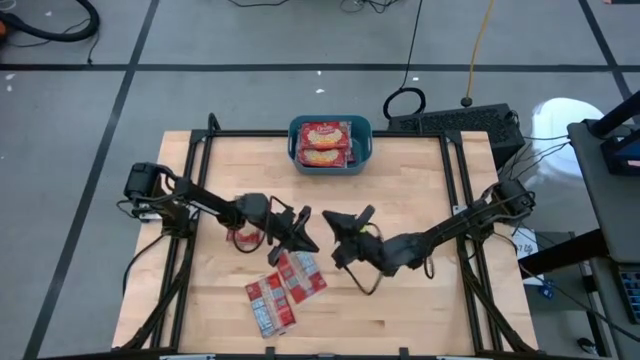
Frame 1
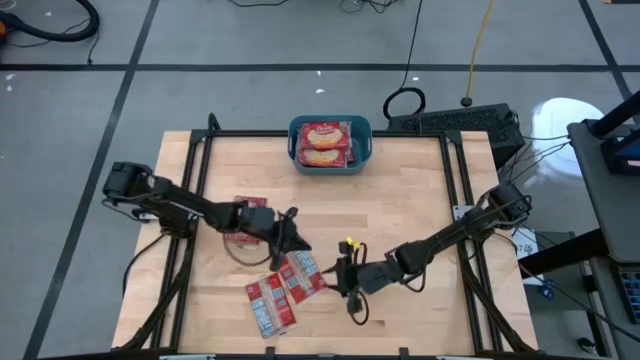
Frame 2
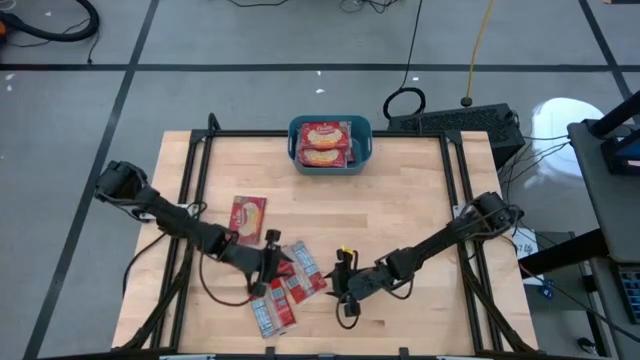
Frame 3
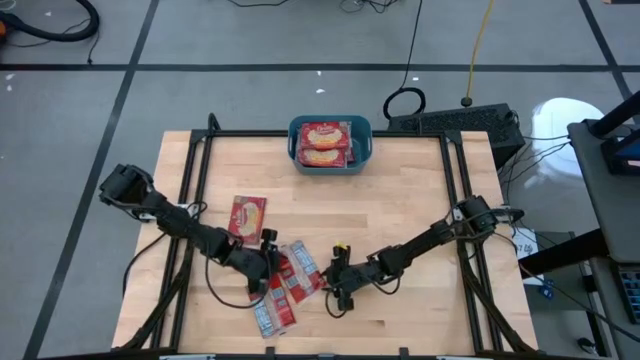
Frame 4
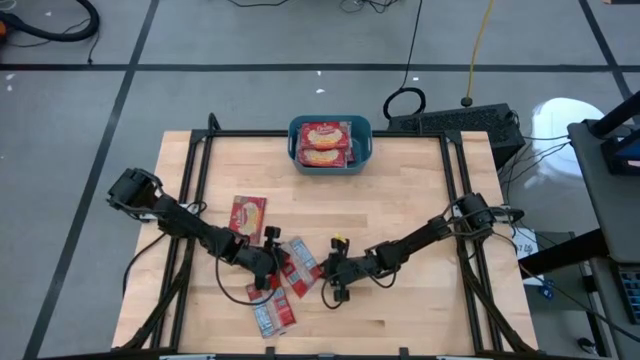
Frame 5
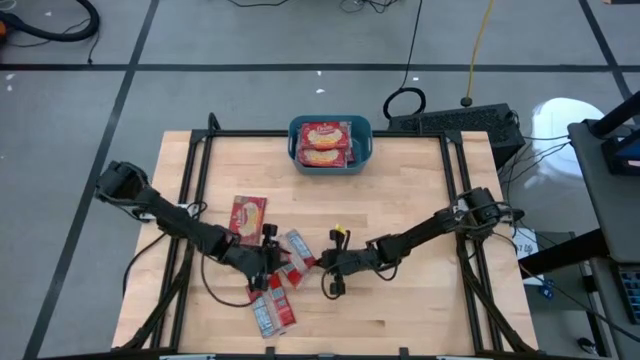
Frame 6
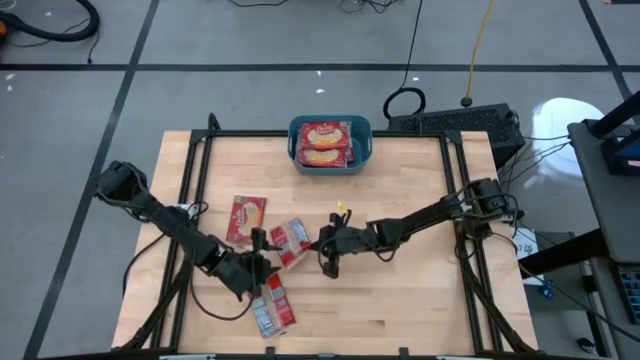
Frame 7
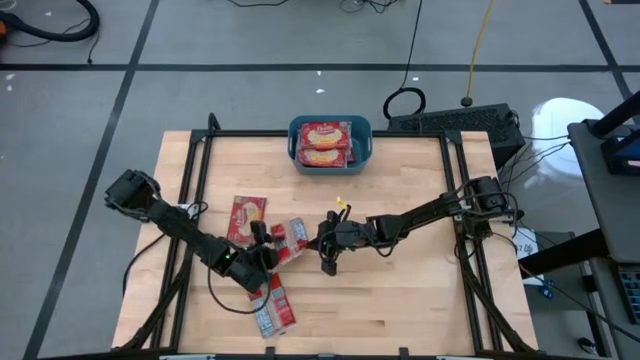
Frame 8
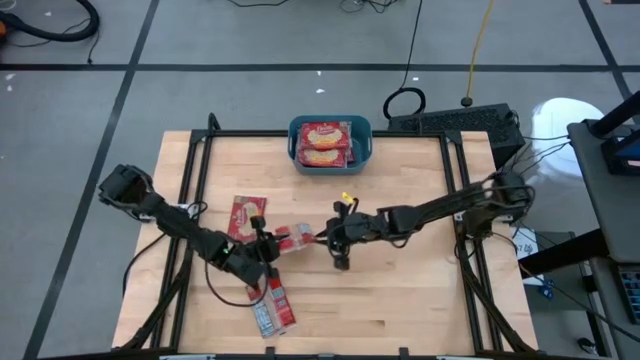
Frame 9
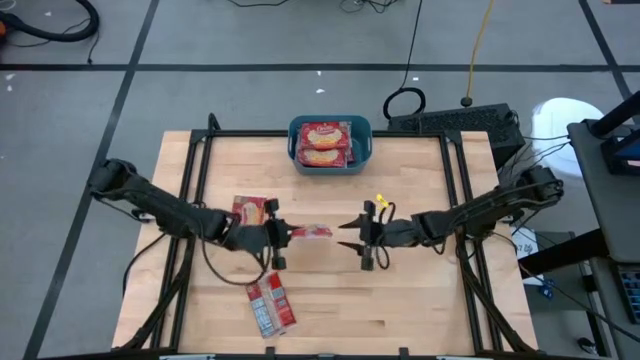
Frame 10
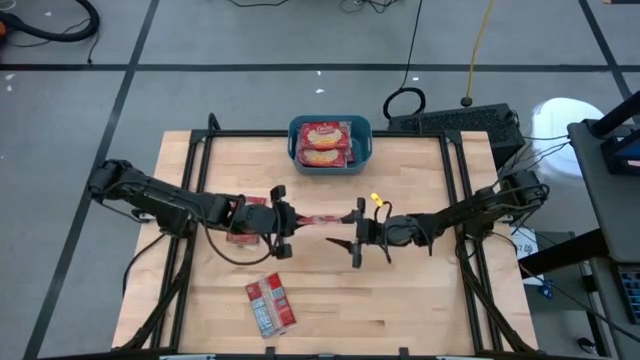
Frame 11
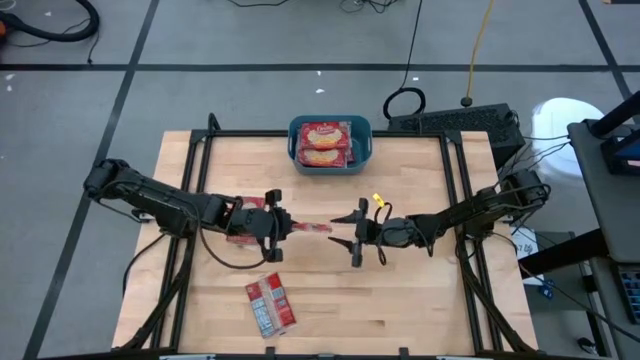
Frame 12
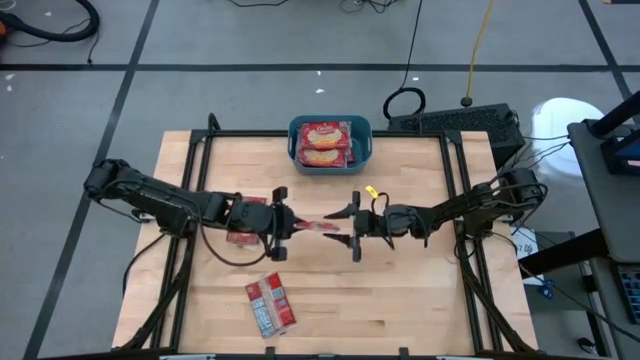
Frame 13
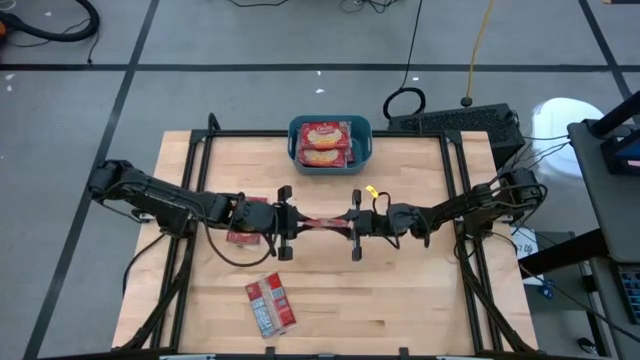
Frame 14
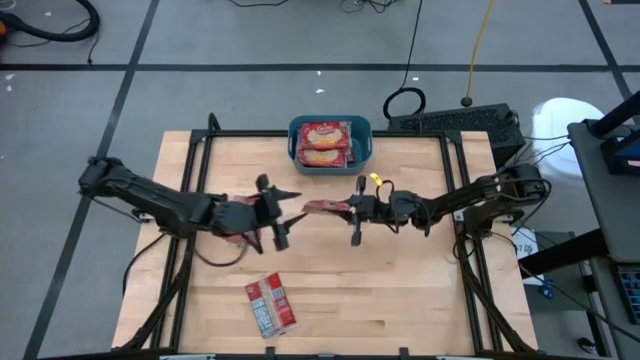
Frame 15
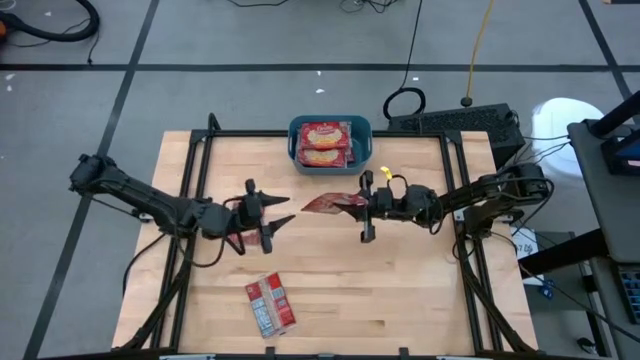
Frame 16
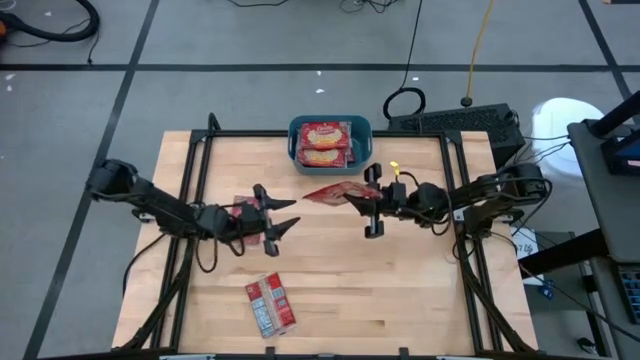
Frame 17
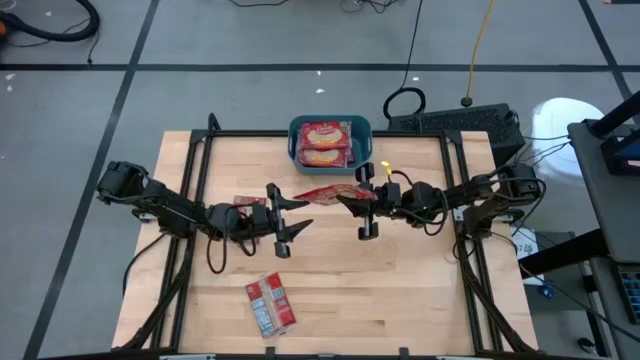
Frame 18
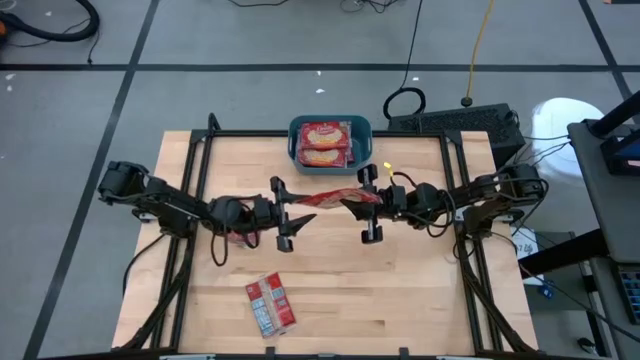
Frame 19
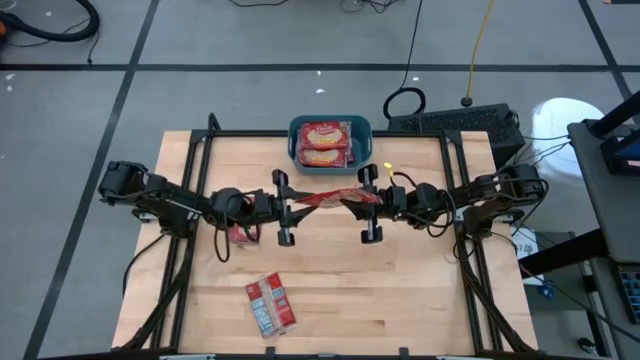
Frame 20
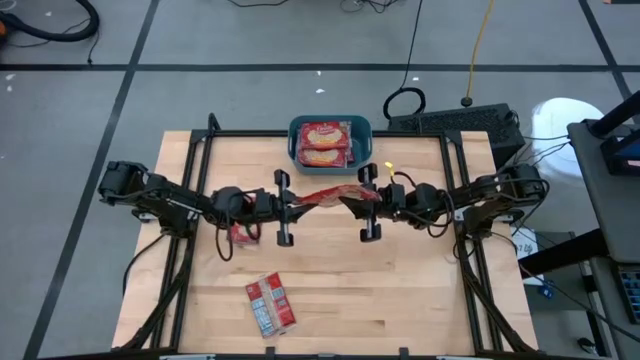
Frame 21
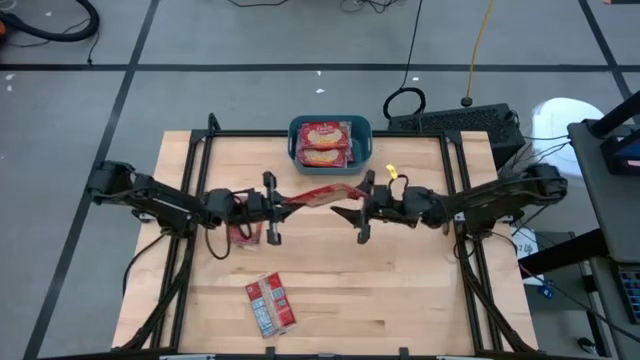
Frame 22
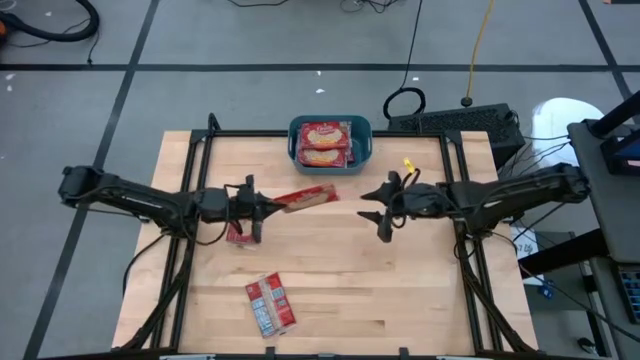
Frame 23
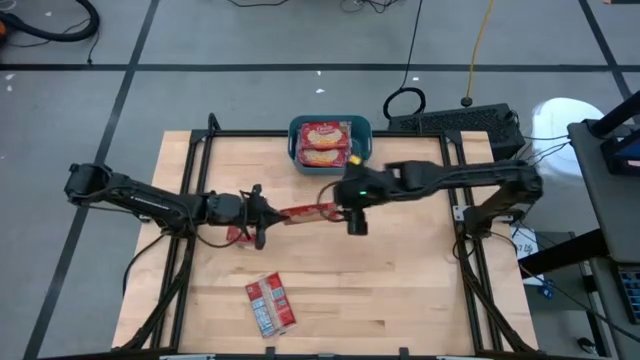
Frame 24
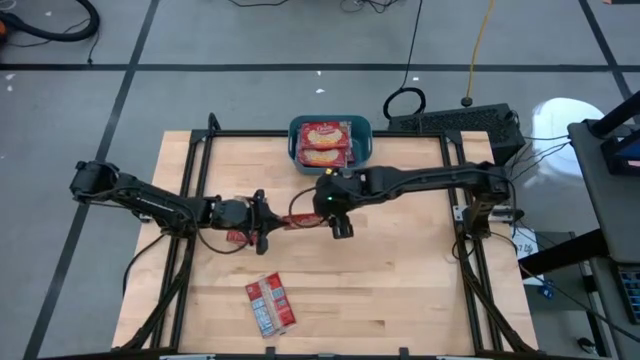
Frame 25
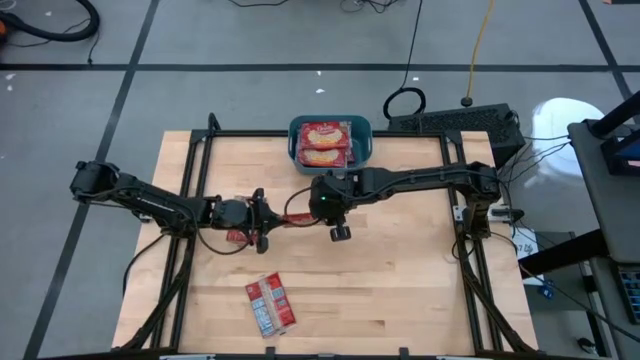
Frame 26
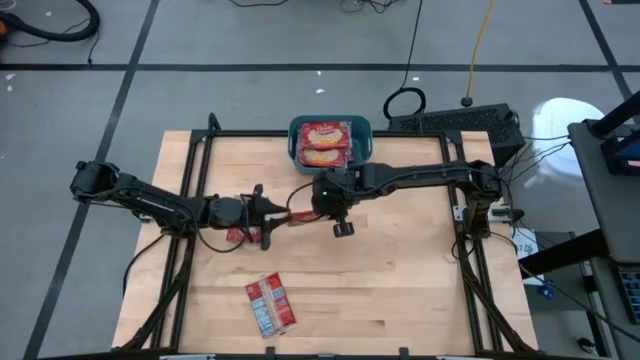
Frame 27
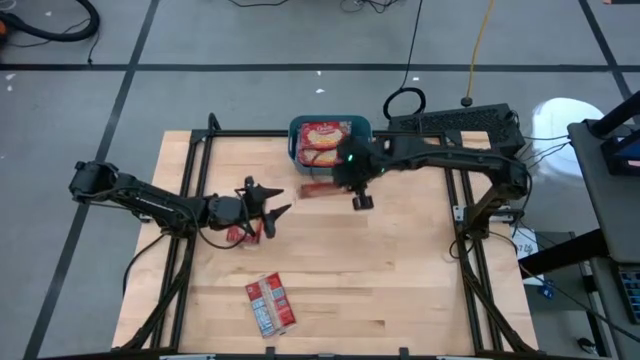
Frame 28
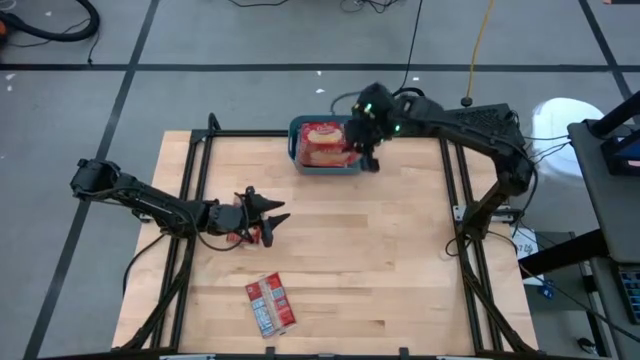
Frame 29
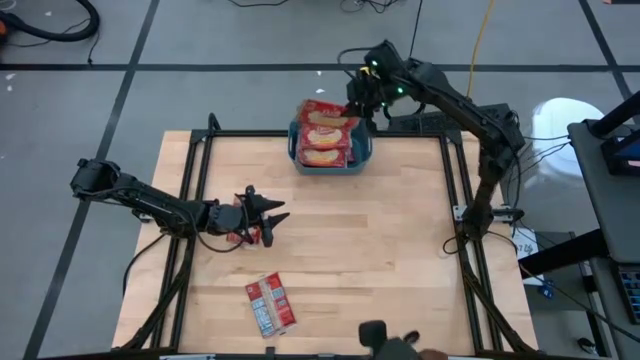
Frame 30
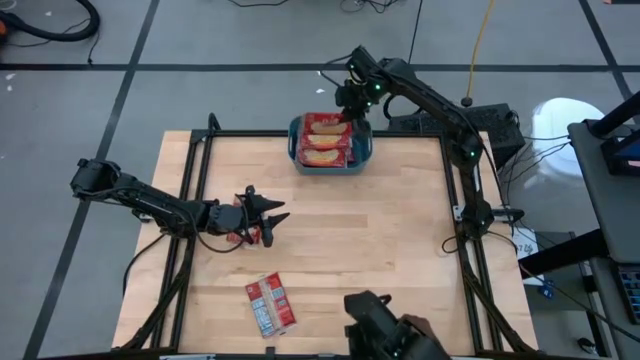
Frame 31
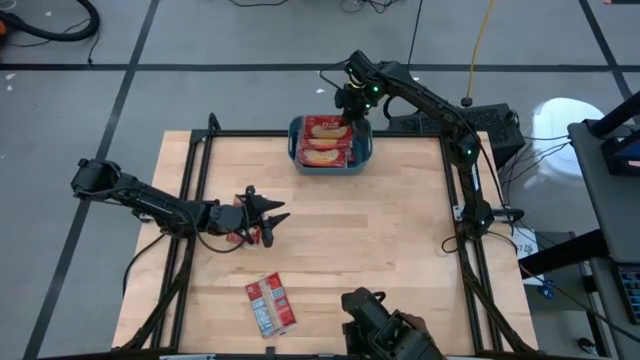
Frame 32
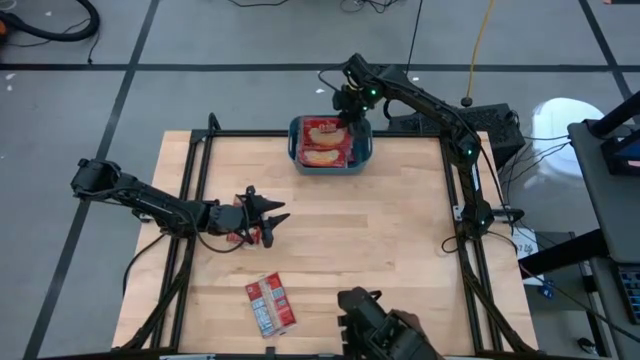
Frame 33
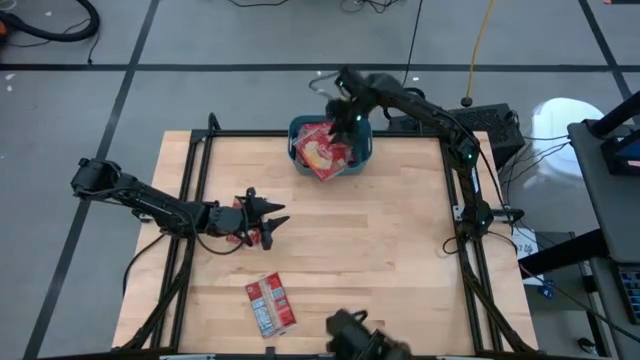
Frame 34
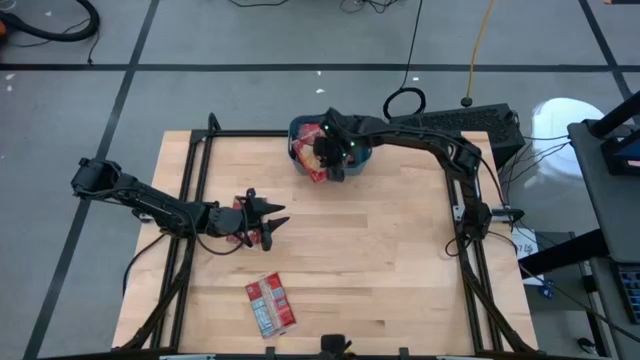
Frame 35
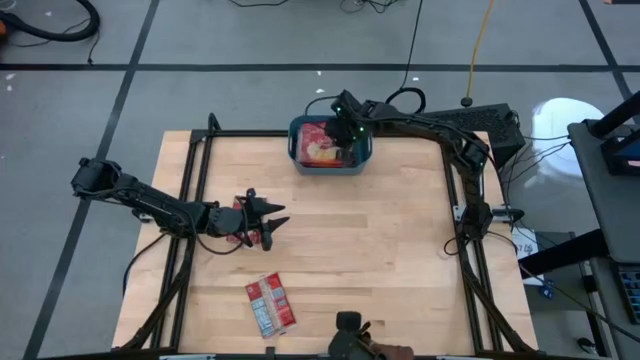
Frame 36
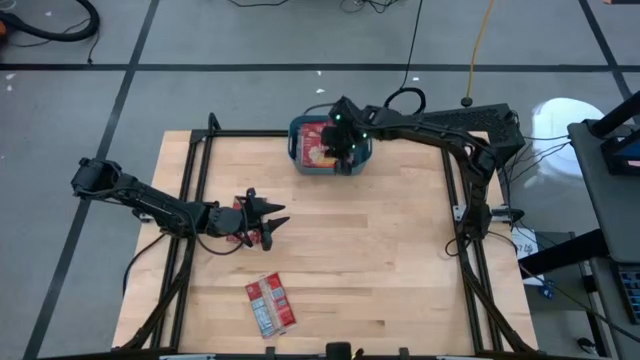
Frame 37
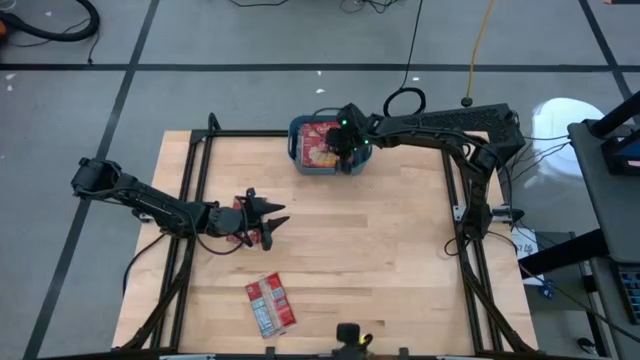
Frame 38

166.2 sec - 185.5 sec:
Task: Sort popcorn bags into baskets
Put the red popcorn bag into the blue bin
